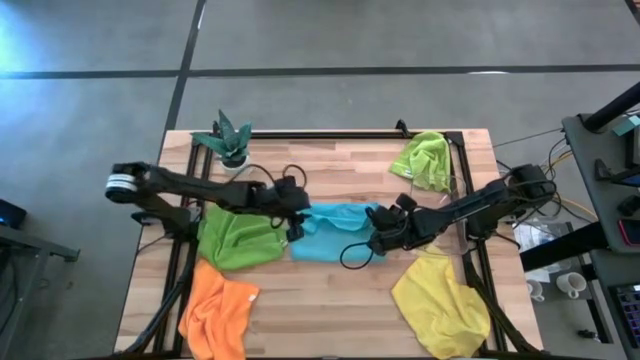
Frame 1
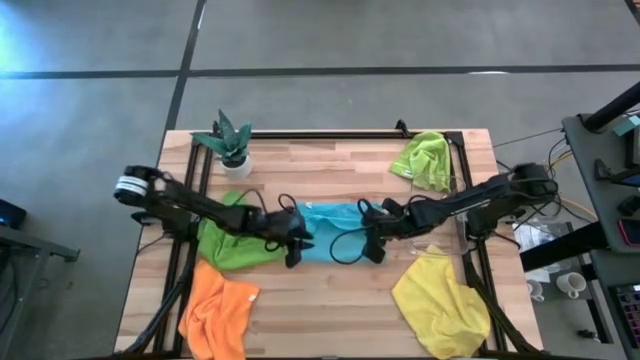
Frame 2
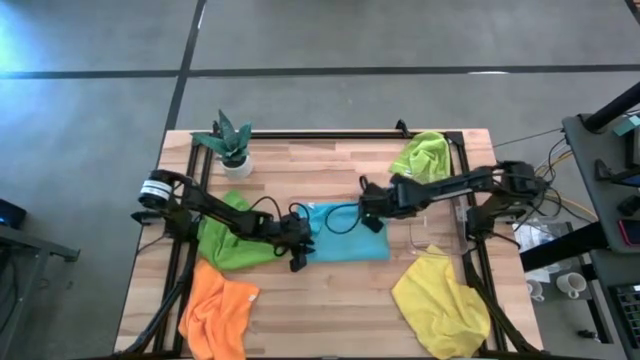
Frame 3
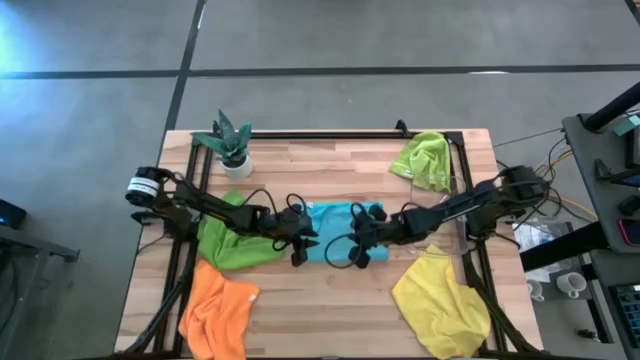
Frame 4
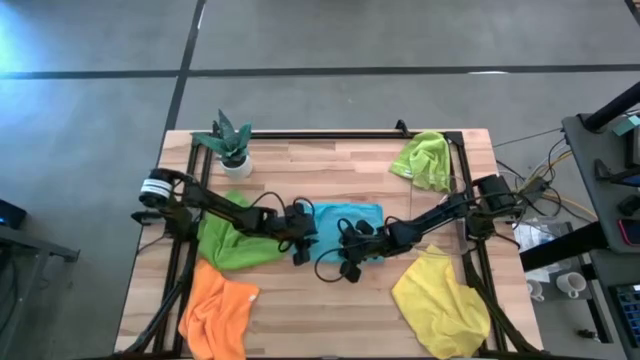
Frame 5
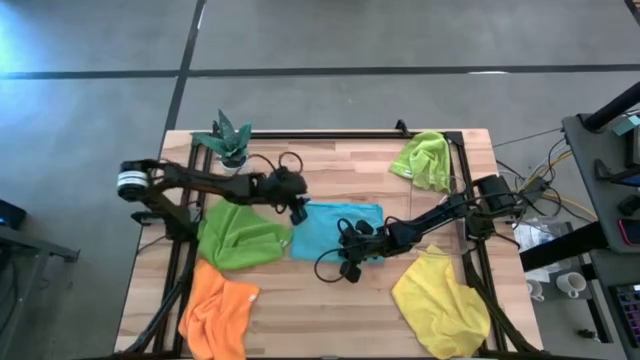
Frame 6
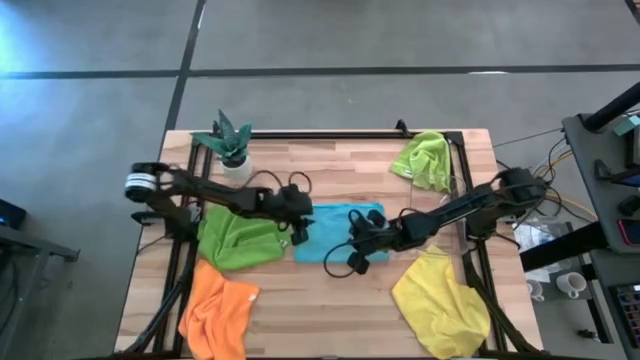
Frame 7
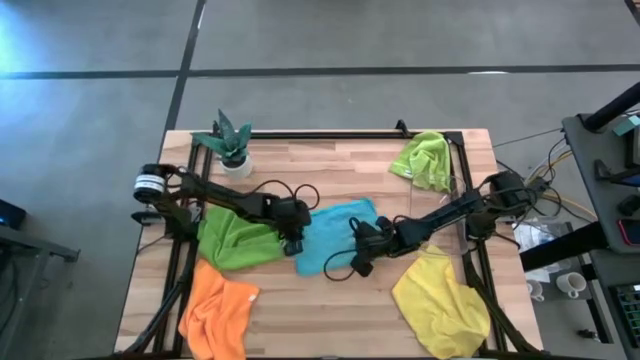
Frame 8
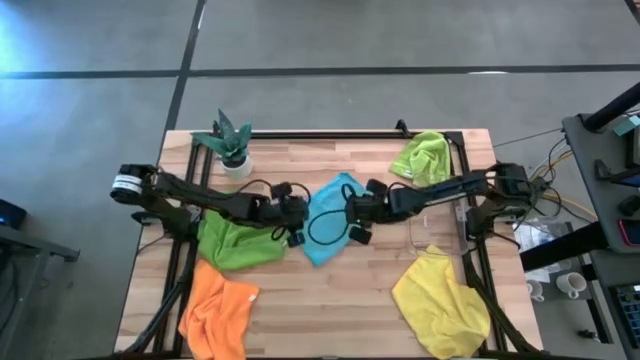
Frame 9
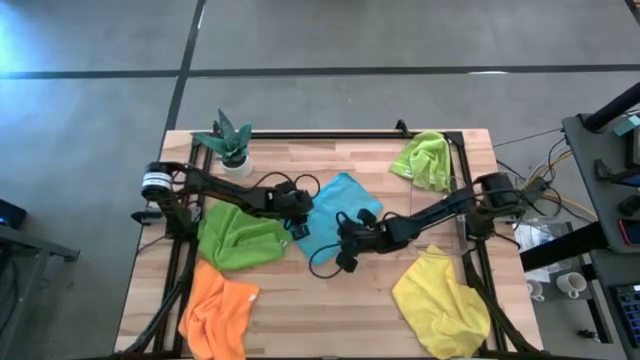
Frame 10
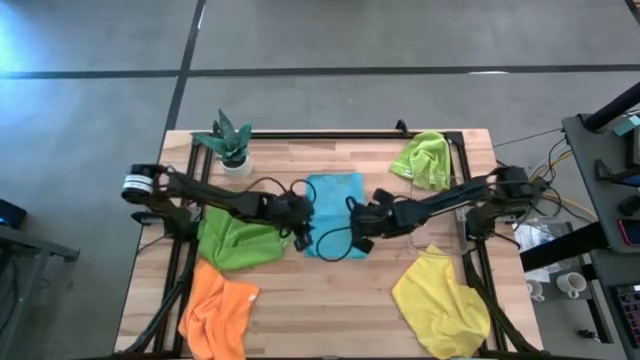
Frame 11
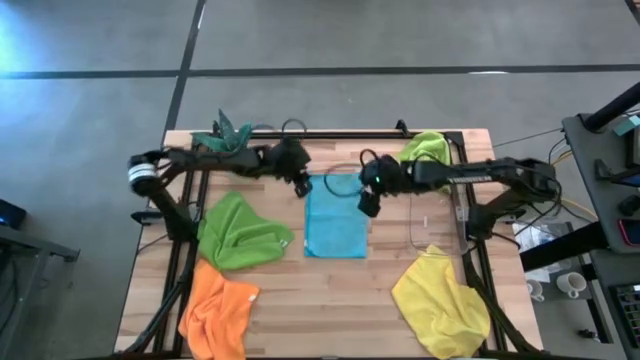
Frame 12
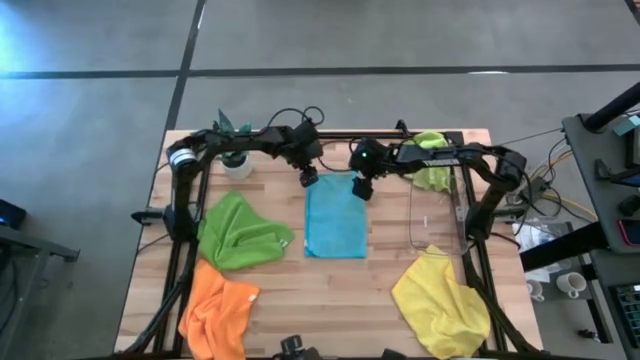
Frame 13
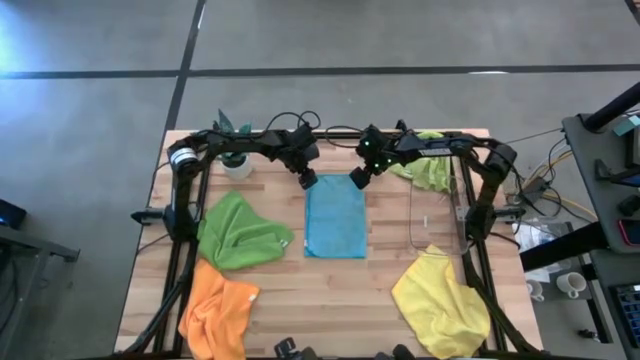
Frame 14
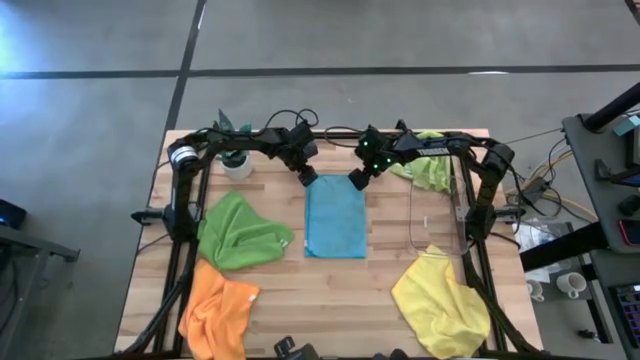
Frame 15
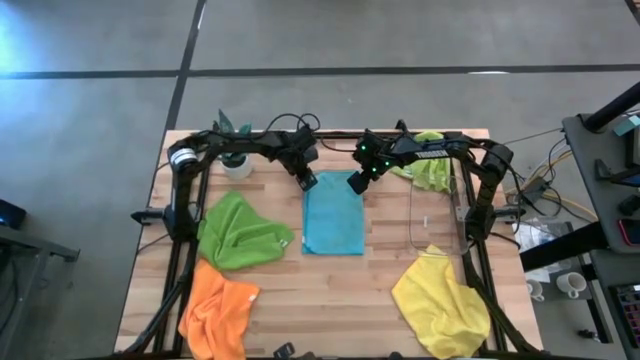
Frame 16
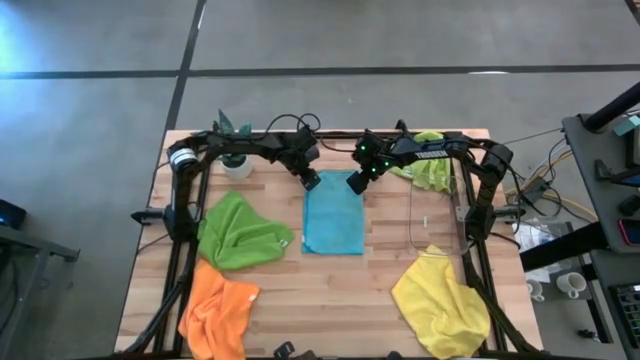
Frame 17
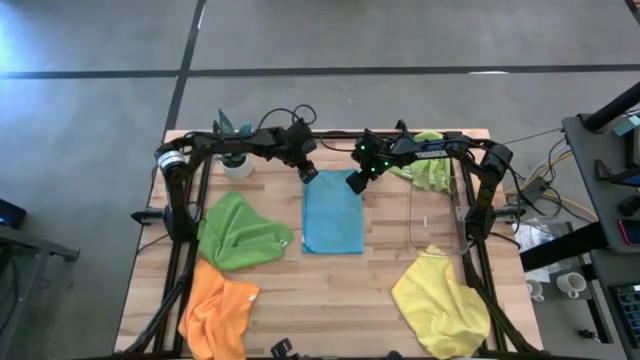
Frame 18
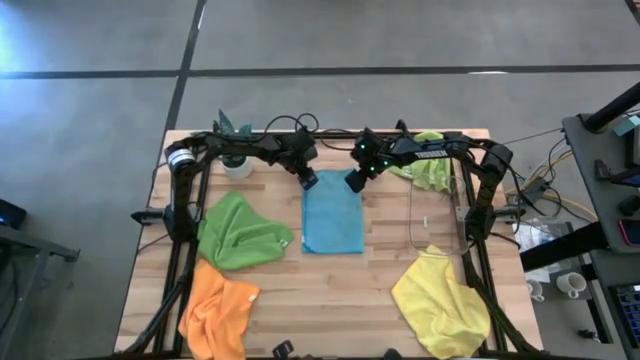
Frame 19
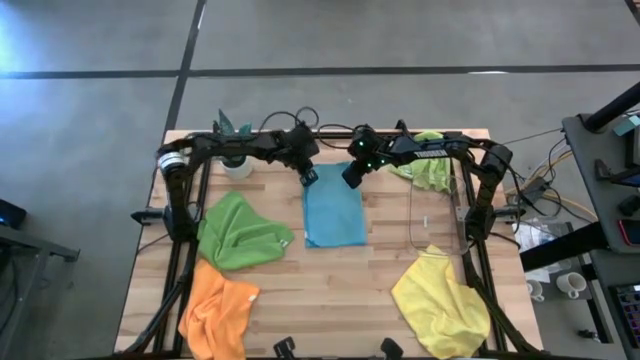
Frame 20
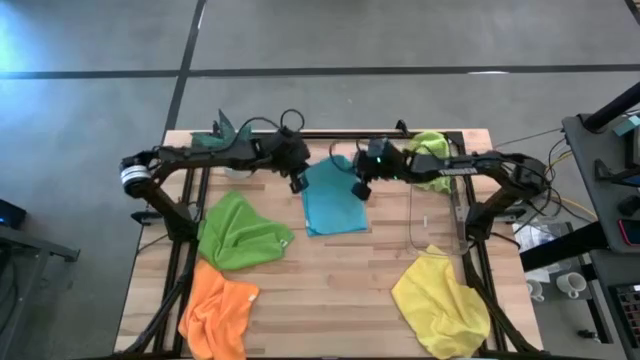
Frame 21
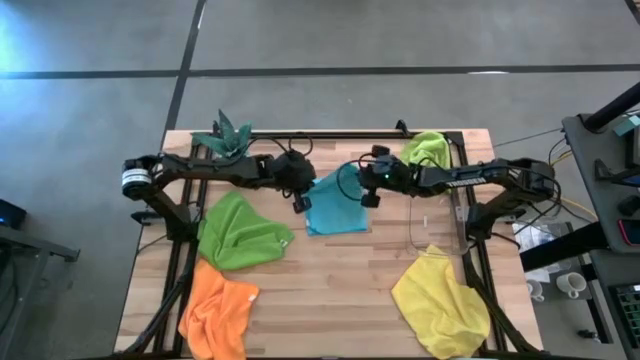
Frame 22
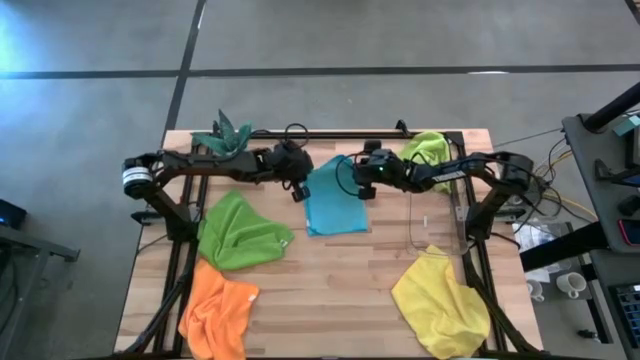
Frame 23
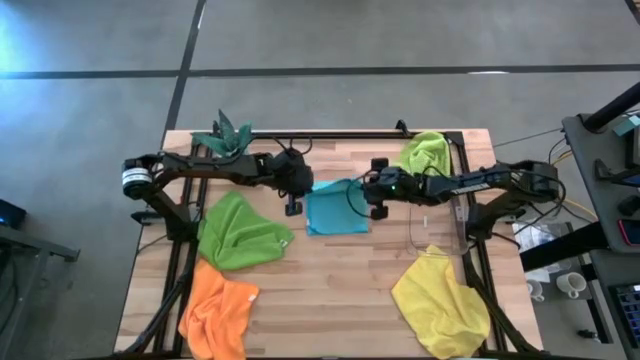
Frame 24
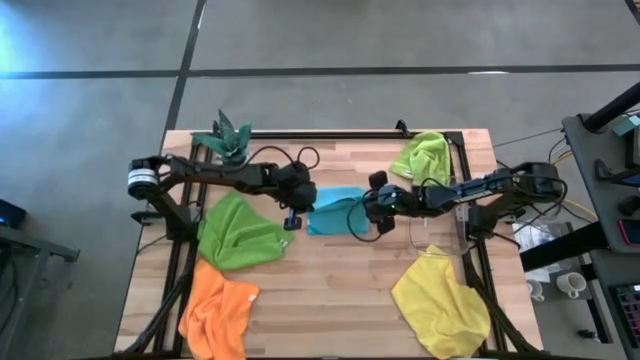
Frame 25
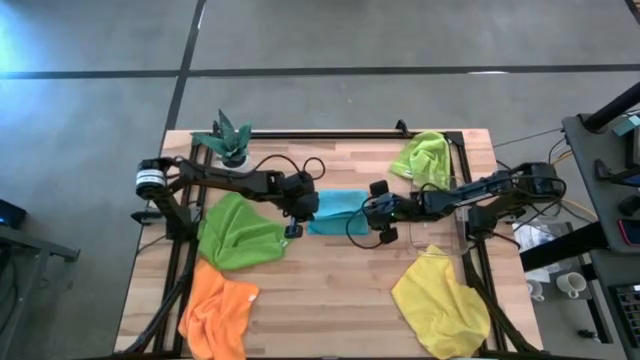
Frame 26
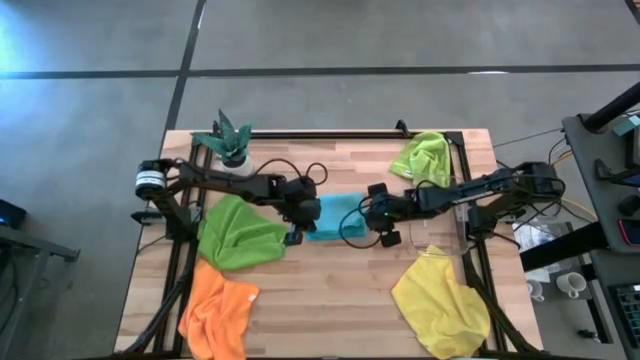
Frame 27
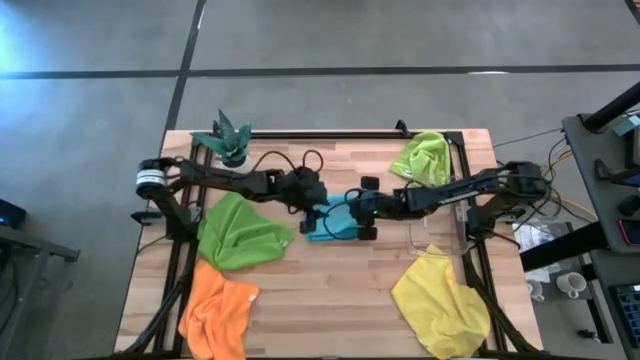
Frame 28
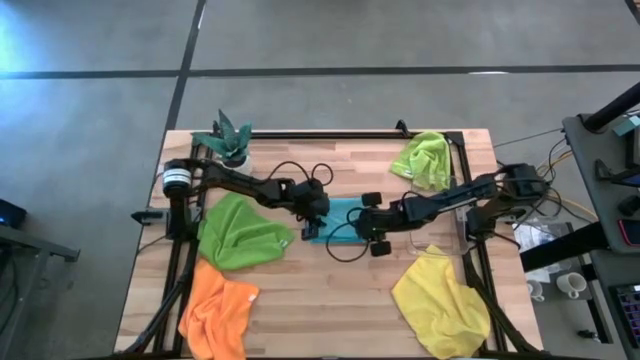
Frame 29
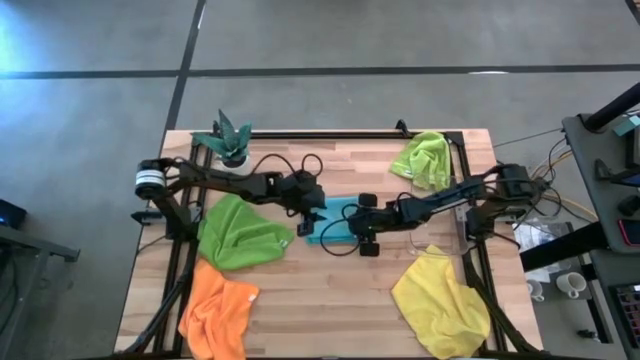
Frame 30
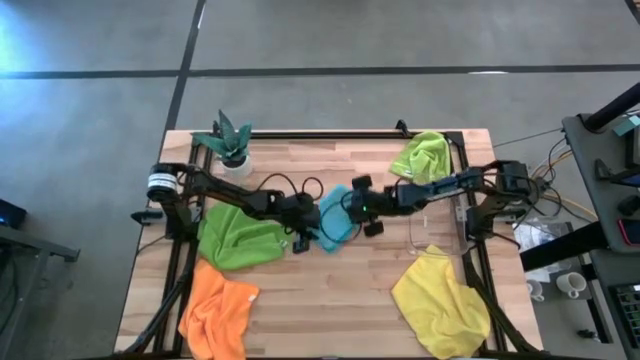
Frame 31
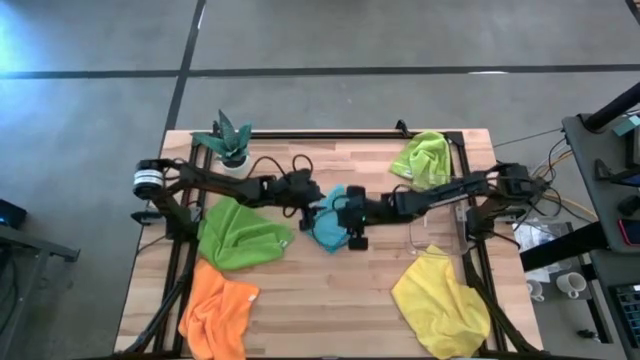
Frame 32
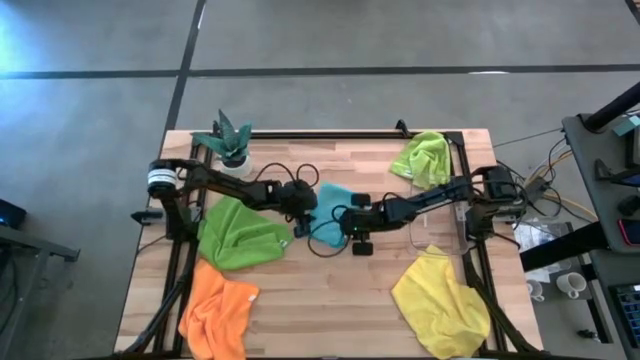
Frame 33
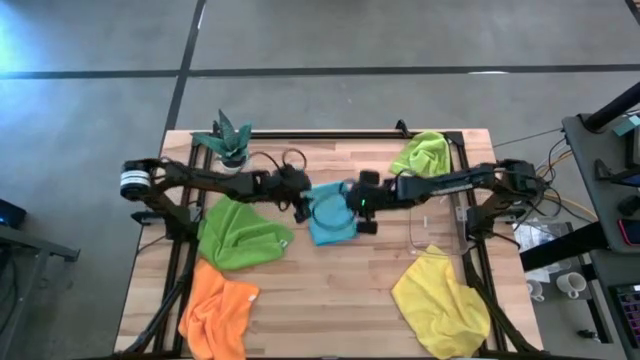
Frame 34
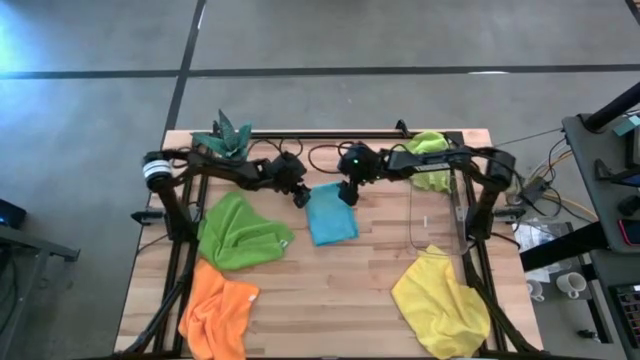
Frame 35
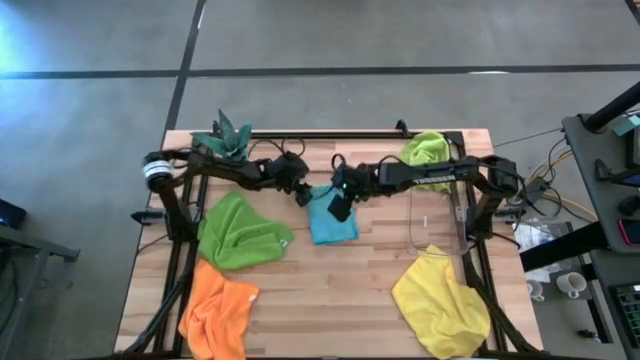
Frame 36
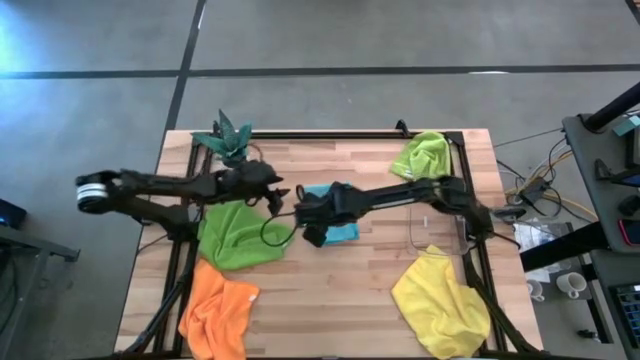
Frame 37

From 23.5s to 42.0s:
Task: Fold microfiber towels
Fold the blue microfiber cloth
